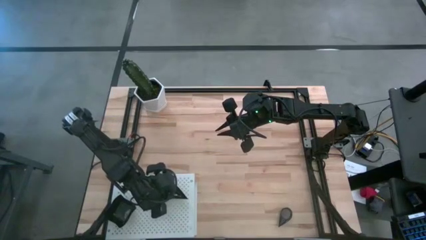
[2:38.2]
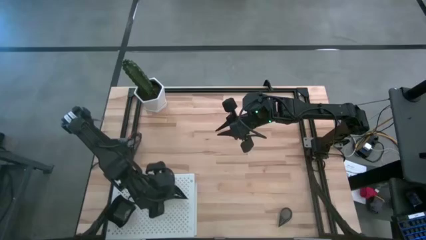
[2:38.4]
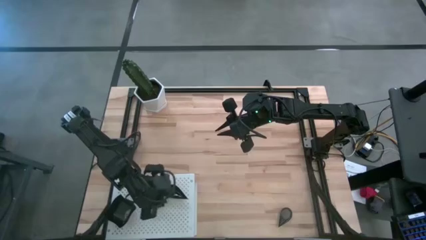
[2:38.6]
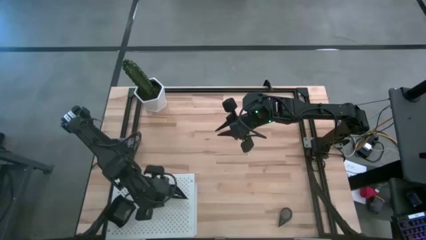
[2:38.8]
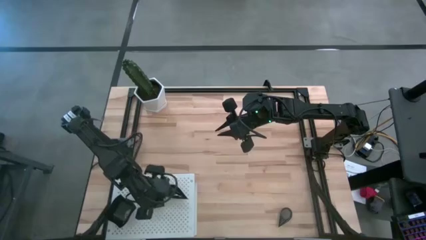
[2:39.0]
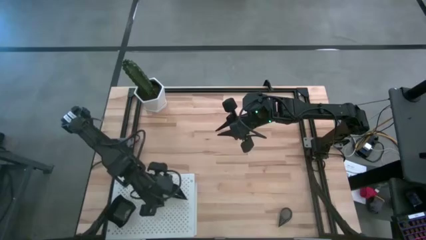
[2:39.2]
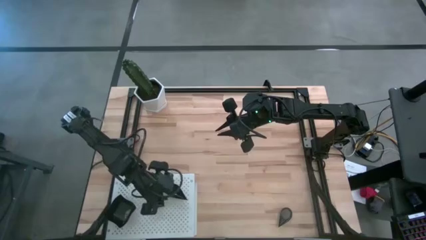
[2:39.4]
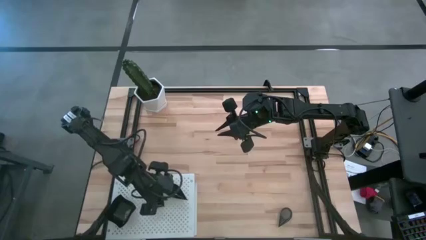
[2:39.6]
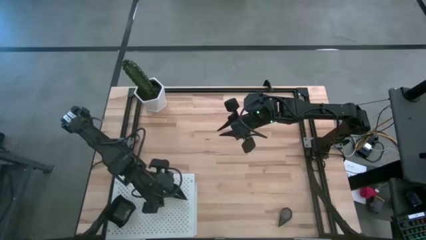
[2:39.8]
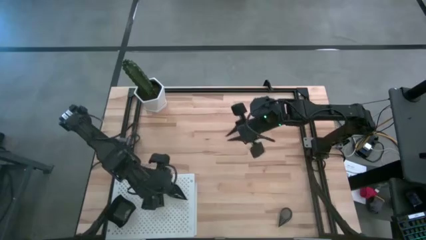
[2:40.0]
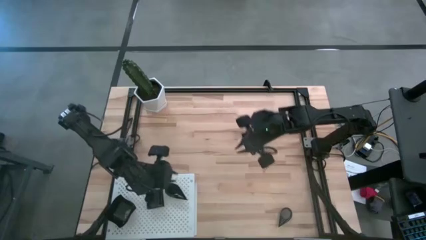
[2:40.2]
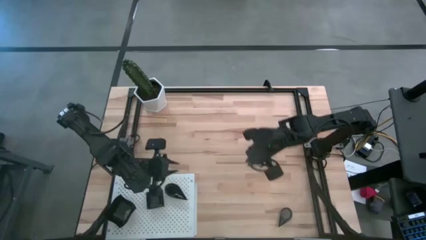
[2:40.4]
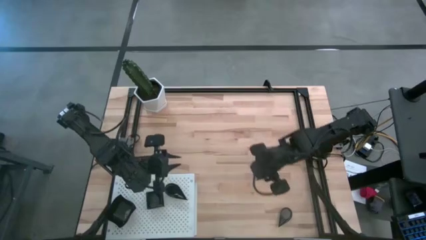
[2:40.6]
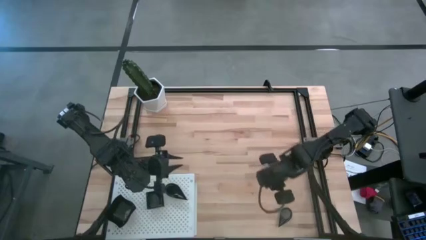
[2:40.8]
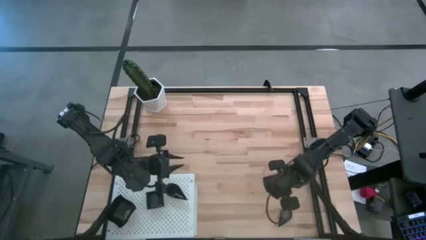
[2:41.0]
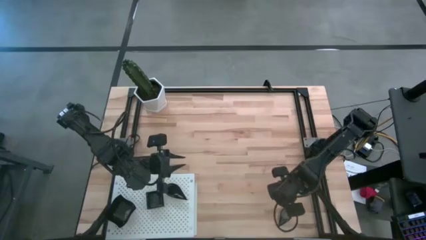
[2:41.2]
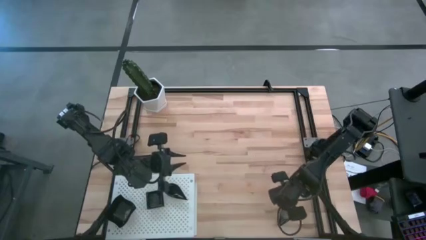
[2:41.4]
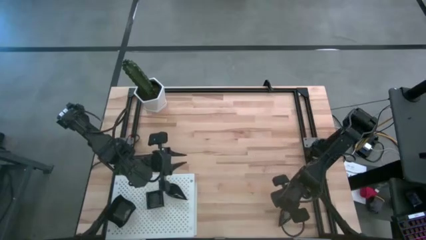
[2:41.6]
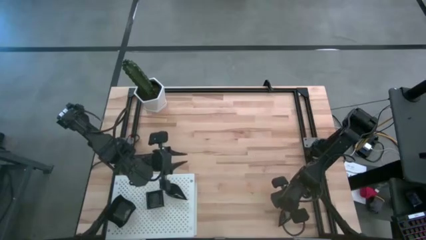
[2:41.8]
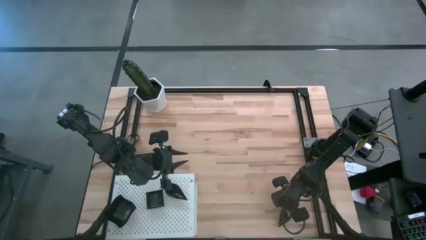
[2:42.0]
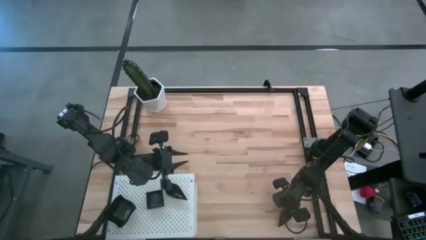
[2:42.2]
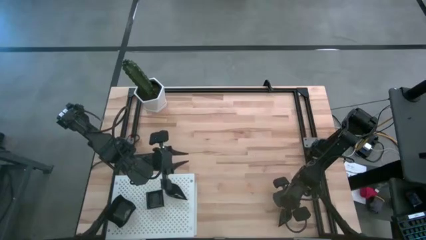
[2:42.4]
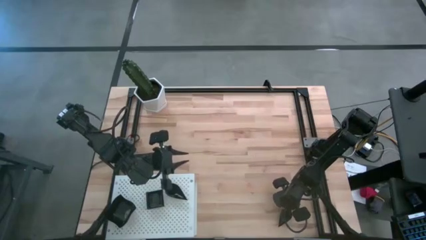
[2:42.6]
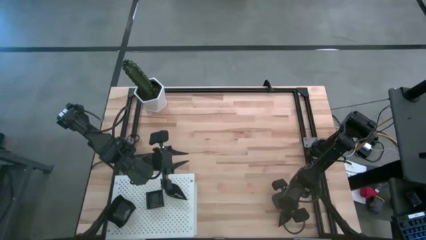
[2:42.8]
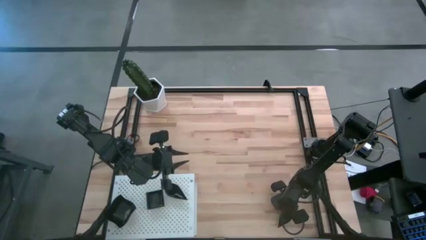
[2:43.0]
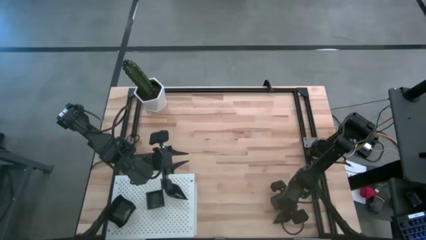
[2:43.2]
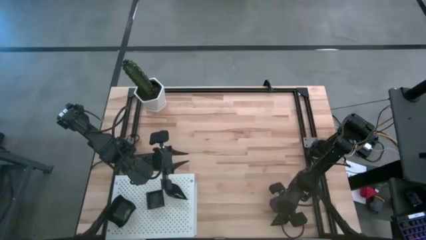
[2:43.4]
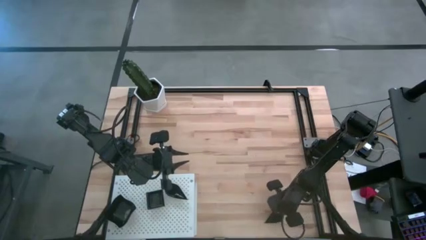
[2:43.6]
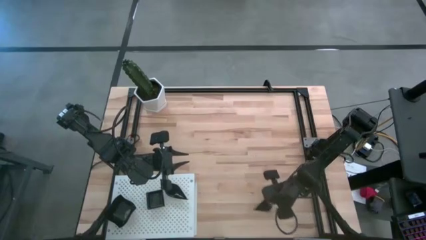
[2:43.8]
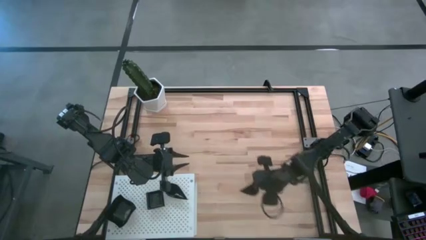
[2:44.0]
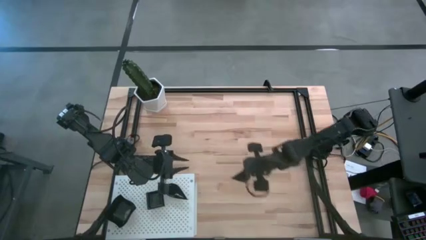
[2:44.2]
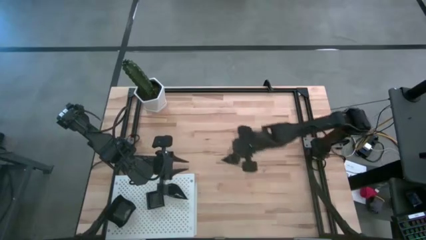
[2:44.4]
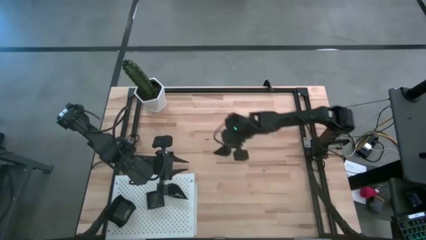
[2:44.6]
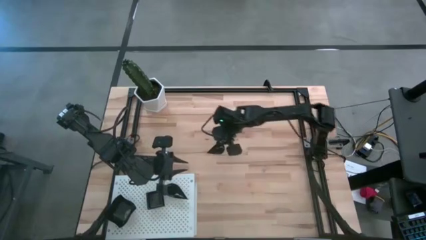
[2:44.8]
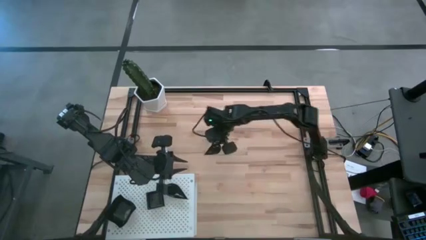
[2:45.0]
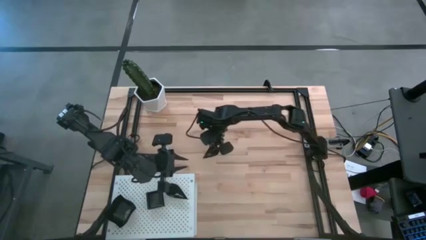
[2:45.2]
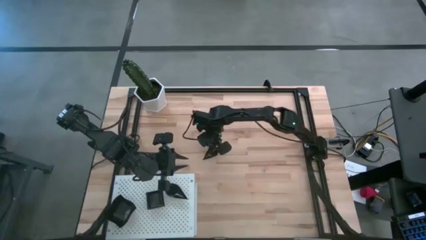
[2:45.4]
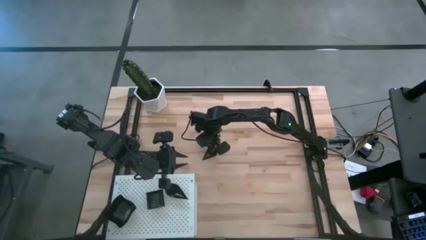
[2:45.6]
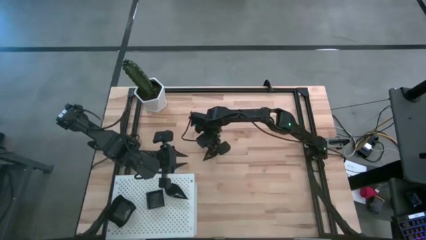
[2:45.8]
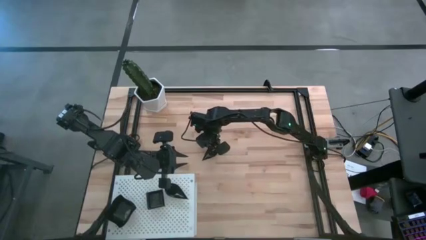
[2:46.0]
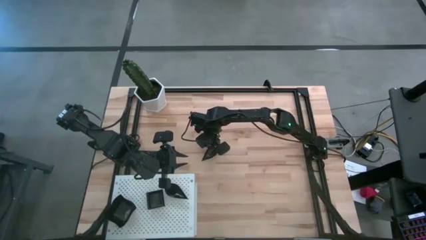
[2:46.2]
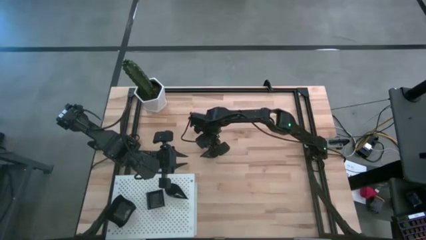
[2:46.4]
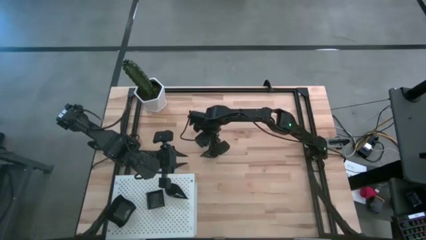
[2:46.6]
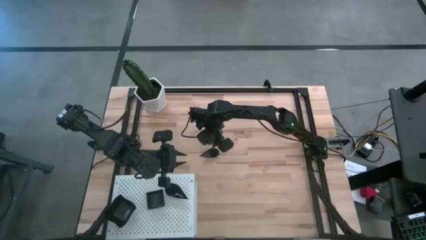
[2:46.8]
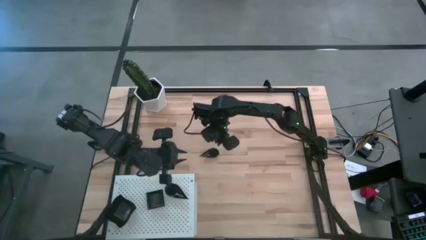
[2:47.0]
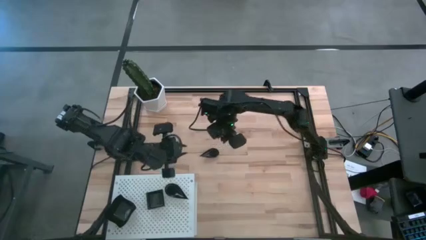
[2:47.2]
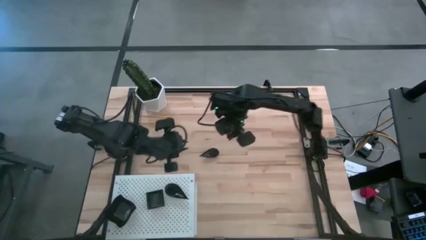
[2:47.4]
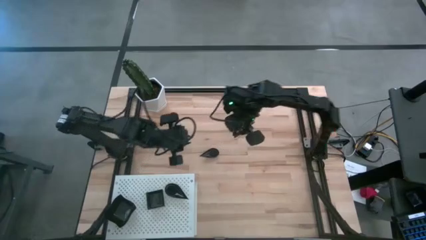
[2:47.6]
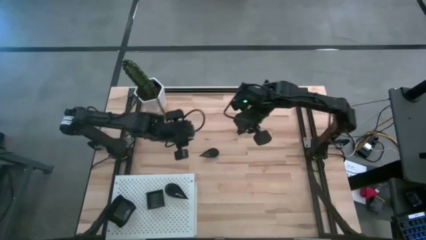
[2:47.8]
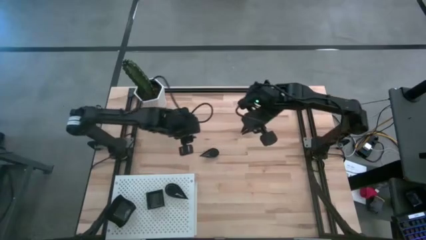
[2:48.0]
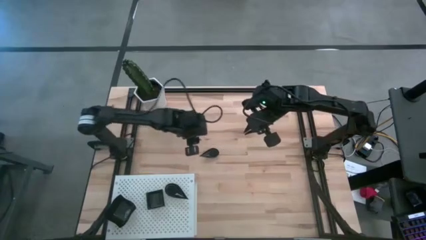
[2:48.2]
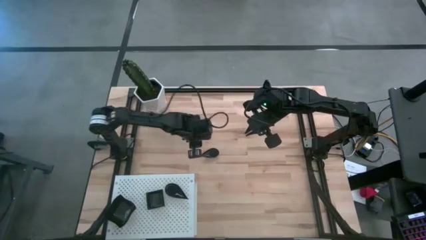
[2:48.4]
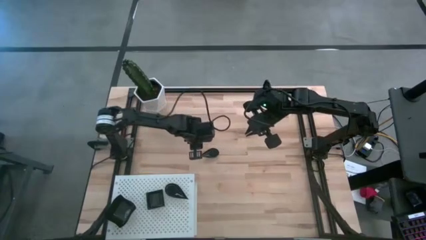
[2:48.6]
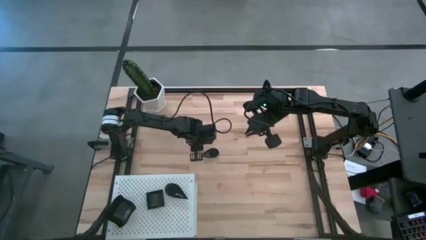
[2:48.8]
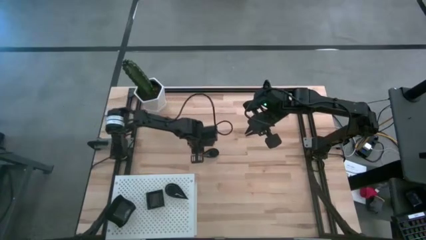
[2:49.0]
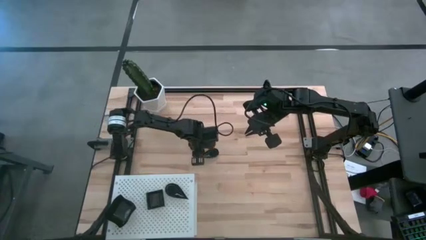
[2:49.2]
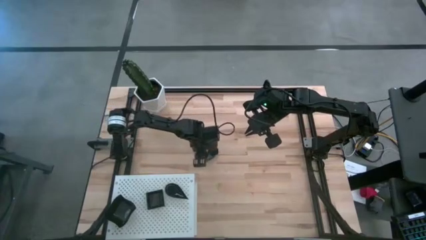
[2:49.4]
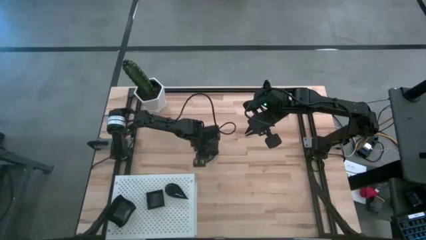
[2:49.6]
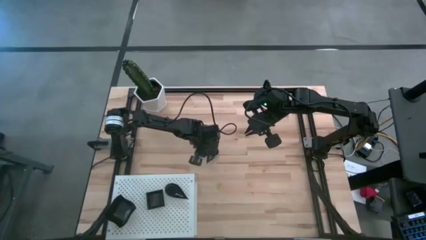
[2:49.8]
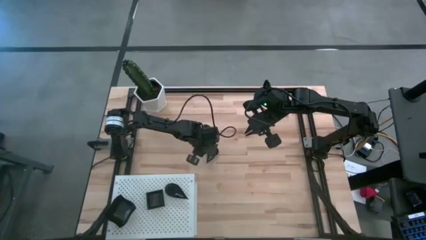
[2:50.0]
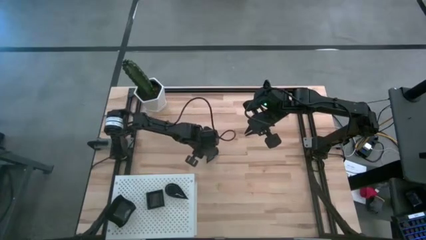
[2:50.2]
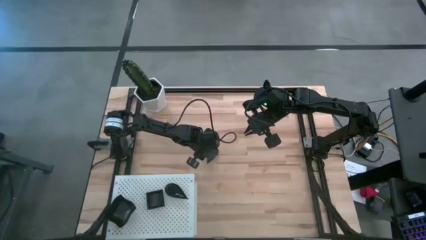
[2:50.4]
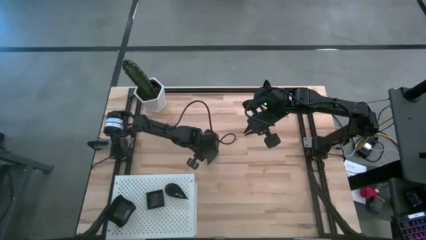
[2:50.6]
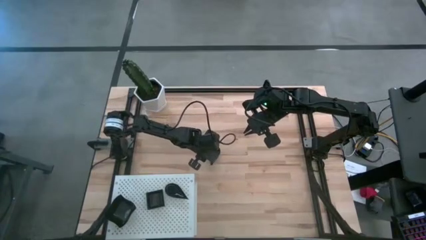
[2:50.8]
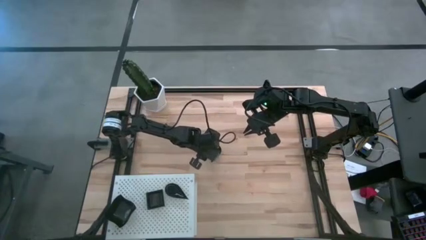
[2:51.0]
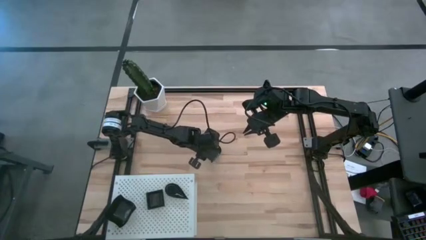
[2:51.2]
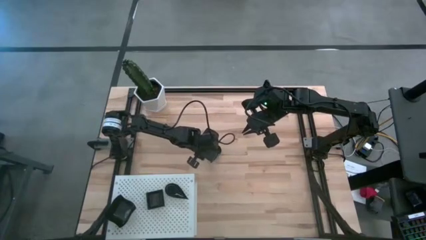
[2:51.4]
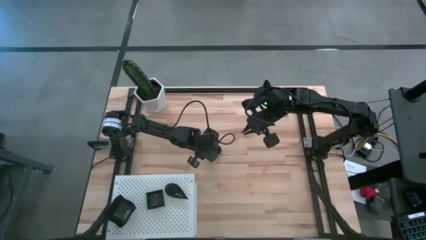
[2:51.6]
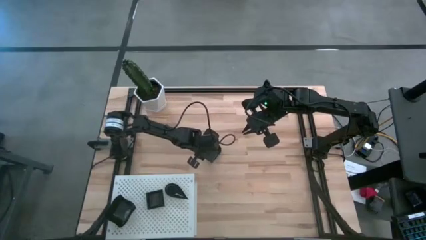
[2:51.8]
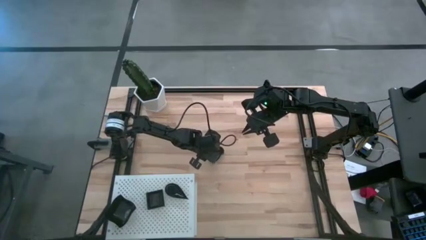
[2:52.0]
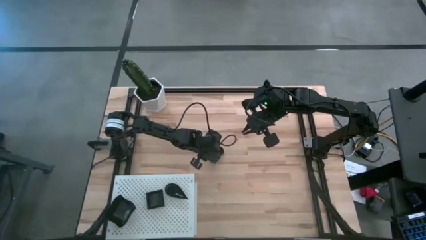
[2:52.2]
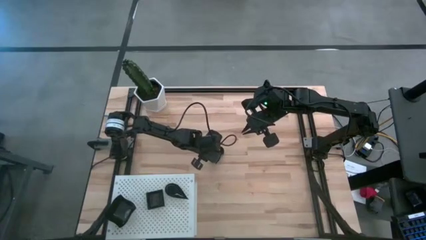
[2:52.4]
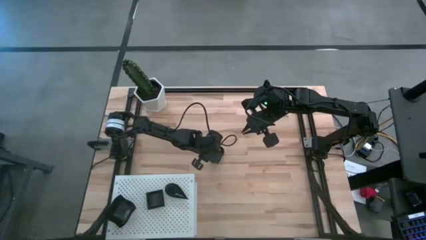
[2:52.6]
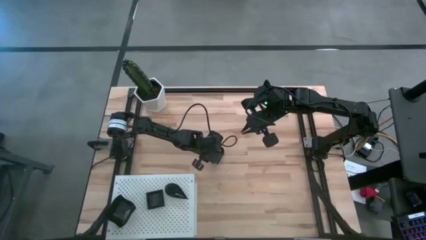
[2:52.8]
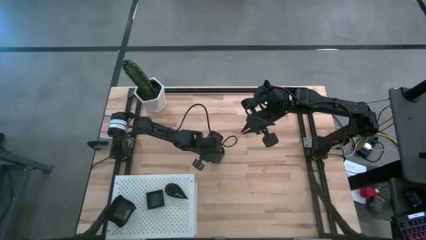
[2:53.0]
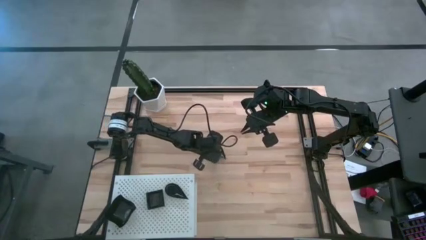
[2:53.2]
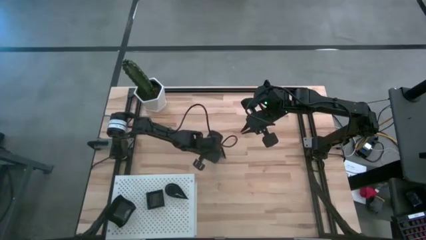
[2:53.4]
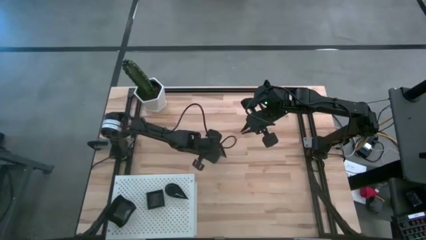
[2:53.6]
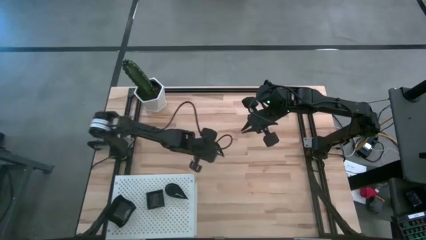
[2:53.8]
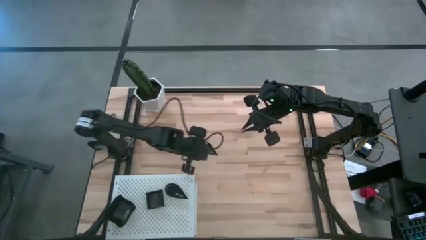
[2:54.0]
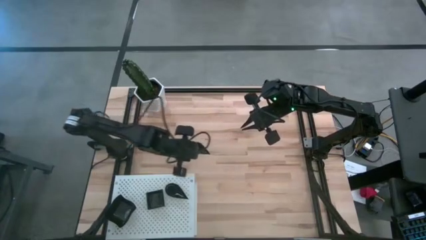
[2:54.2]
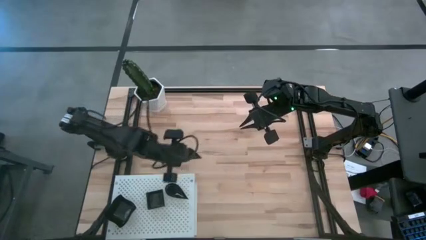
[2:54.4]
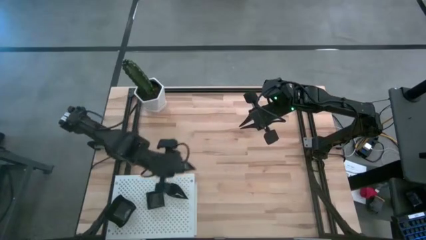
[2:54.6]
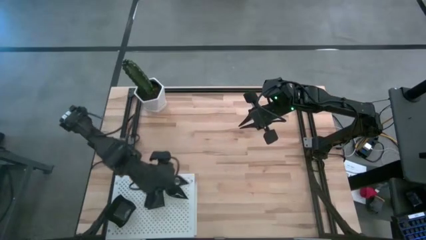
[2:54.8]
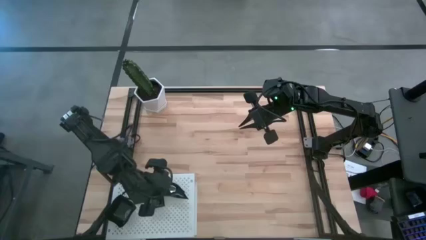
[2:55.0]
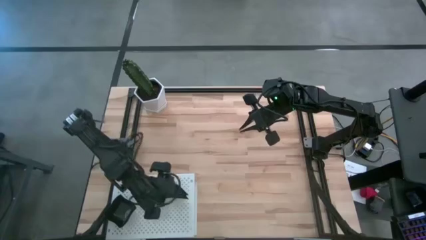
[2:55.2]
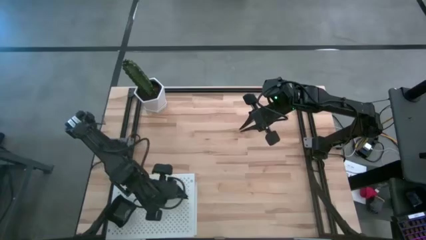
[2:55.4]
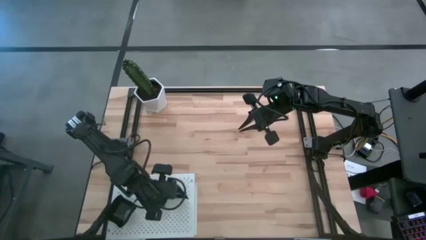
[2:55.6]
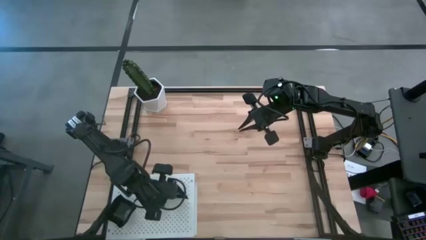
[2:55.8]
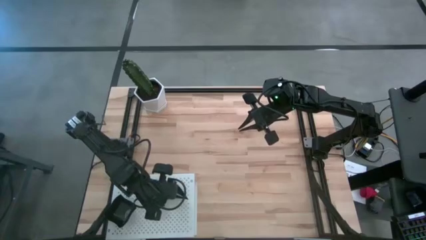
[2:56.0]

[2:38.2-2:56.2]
Task: Pick & Place Mini shaped plates
Stack the drop shaped plate on top of the other drop shaped plate on the shelf
